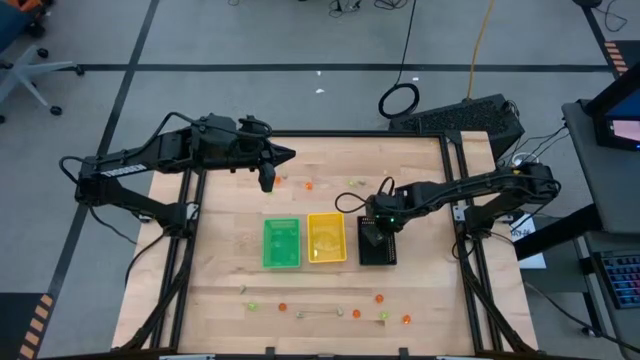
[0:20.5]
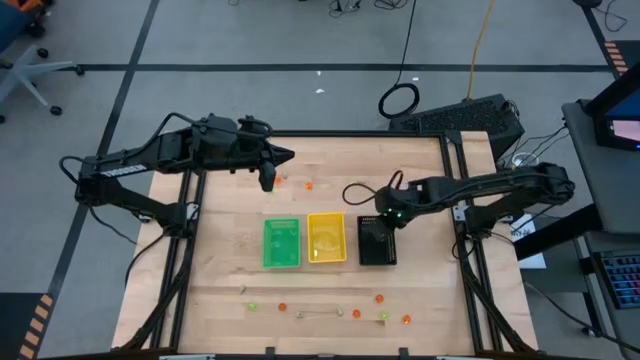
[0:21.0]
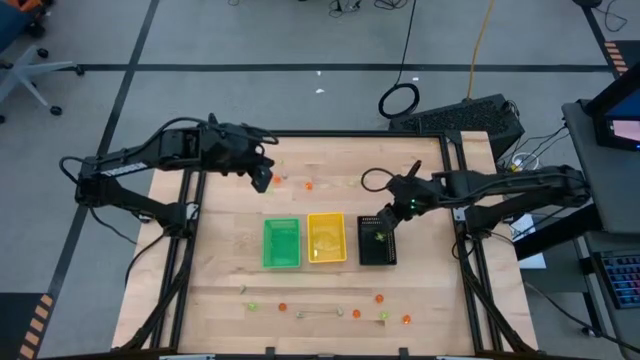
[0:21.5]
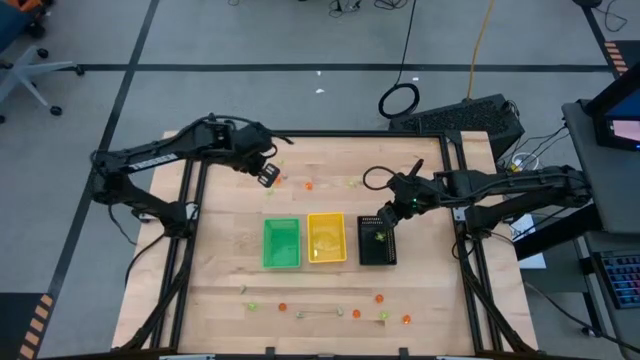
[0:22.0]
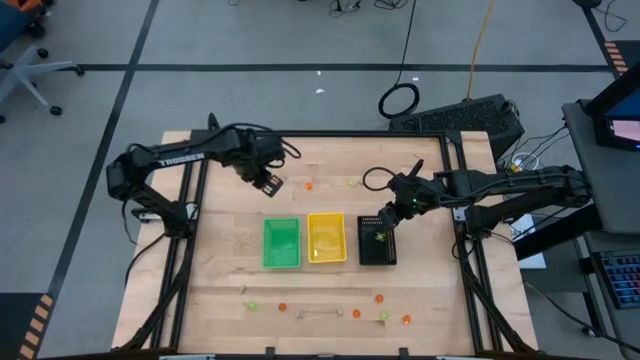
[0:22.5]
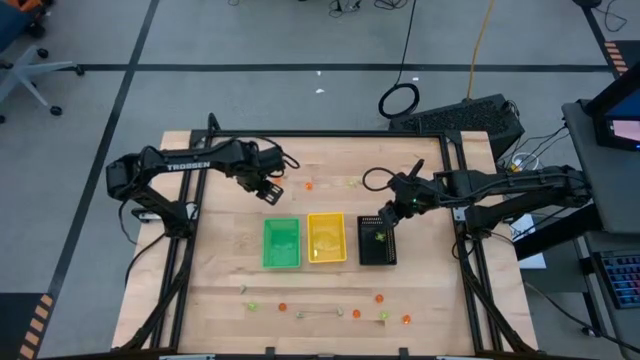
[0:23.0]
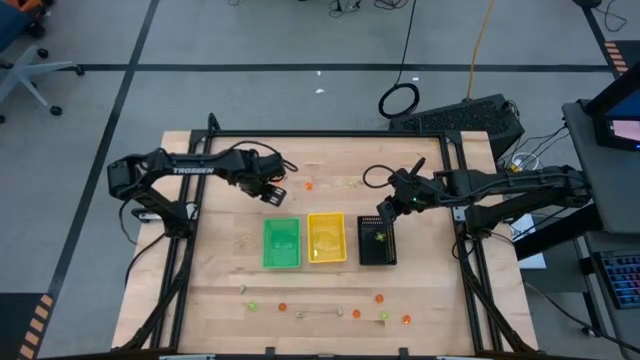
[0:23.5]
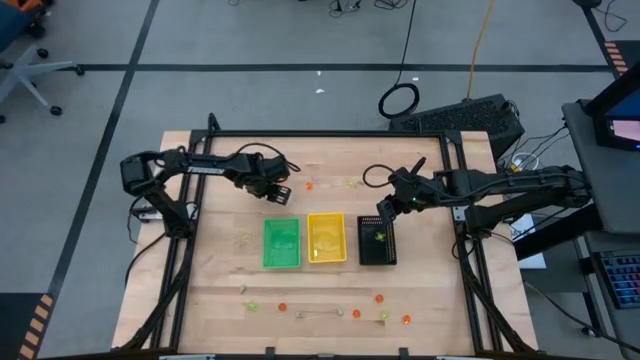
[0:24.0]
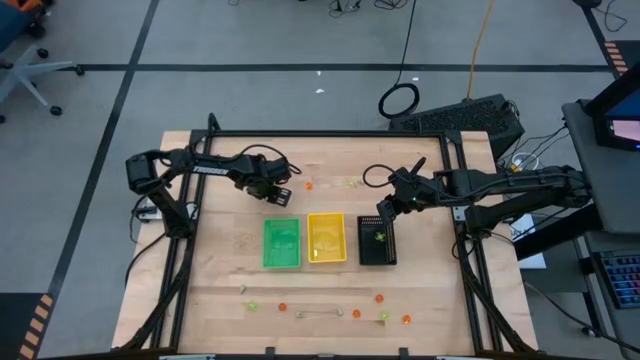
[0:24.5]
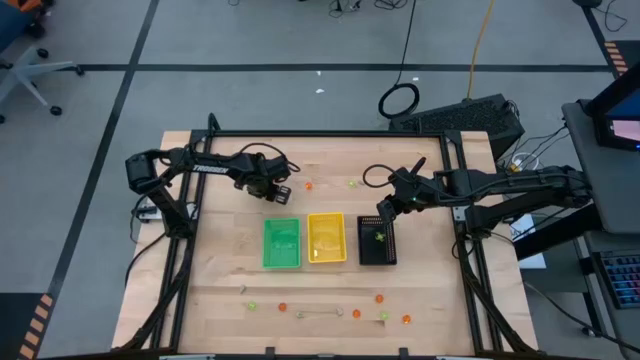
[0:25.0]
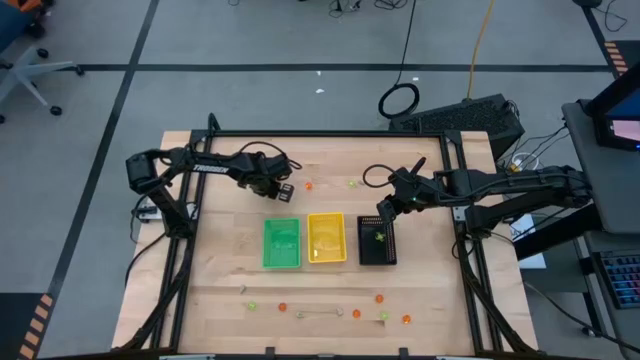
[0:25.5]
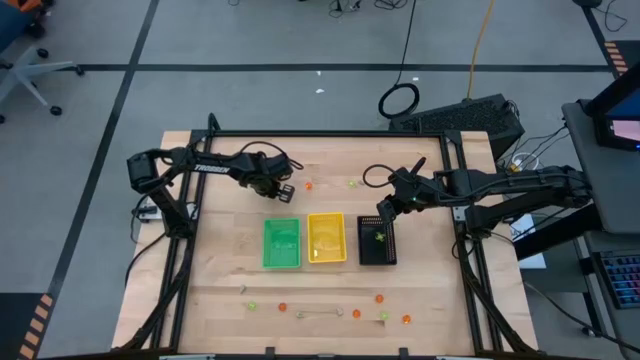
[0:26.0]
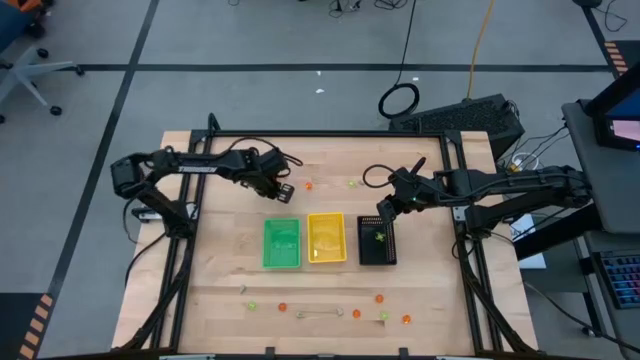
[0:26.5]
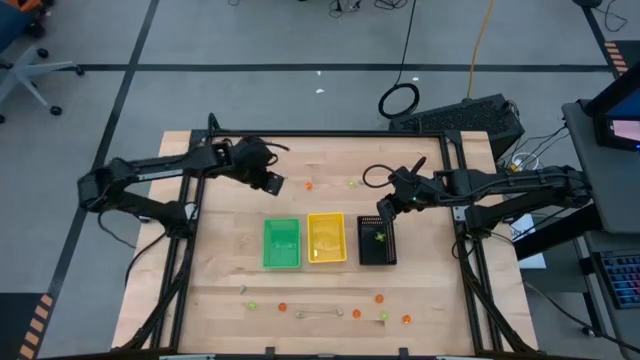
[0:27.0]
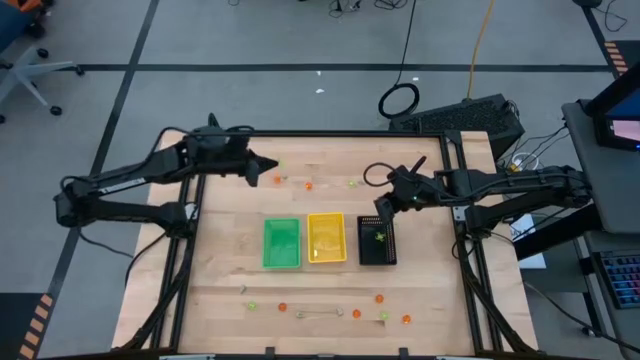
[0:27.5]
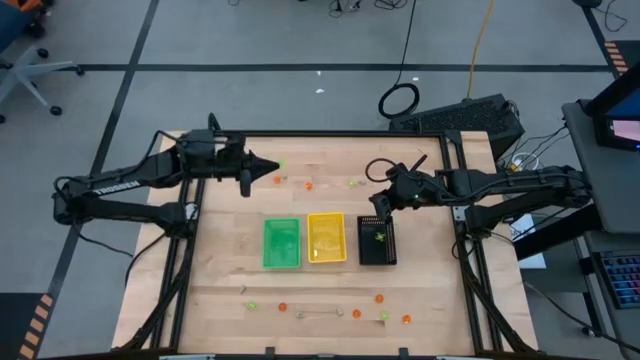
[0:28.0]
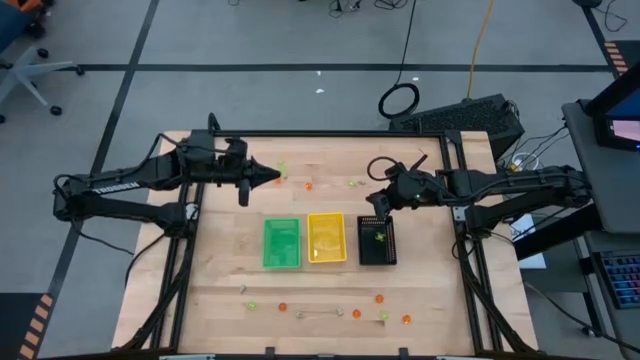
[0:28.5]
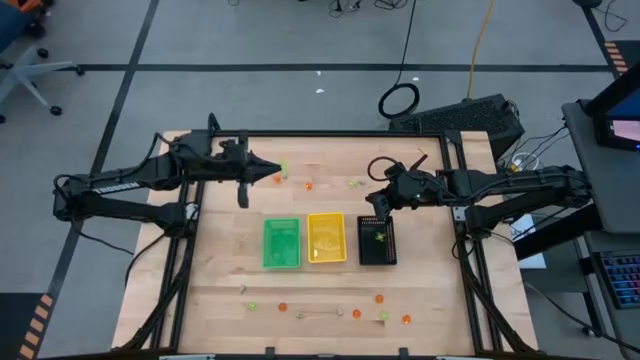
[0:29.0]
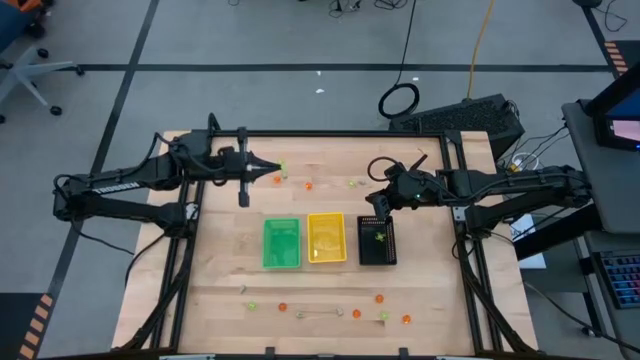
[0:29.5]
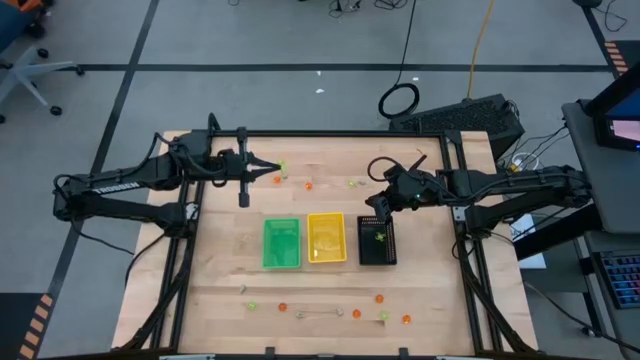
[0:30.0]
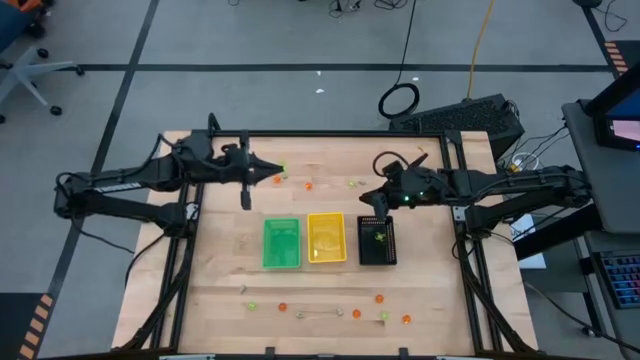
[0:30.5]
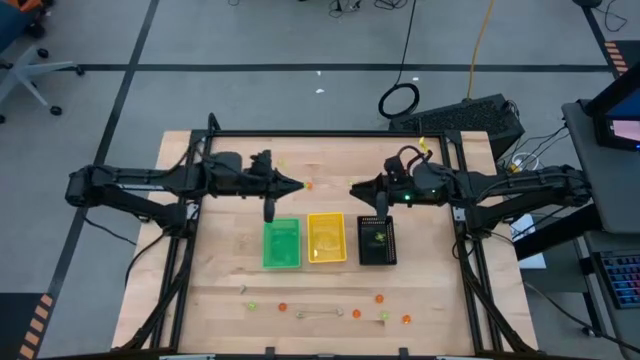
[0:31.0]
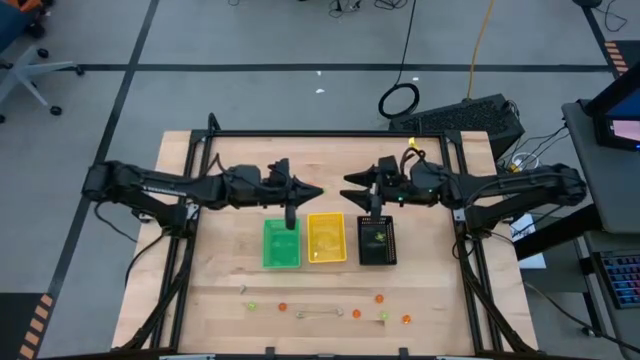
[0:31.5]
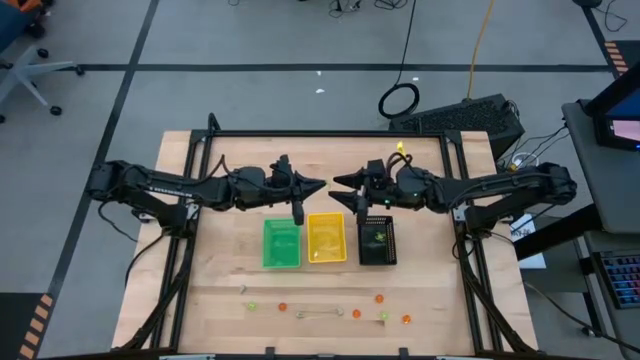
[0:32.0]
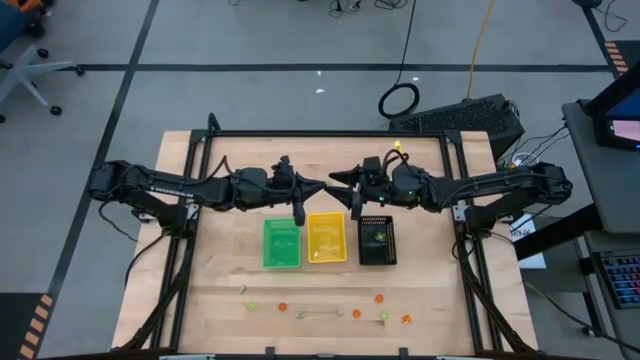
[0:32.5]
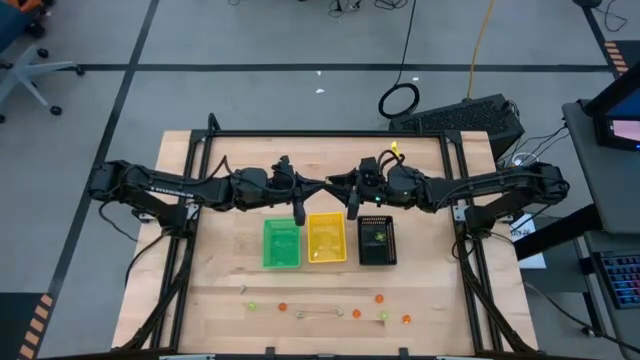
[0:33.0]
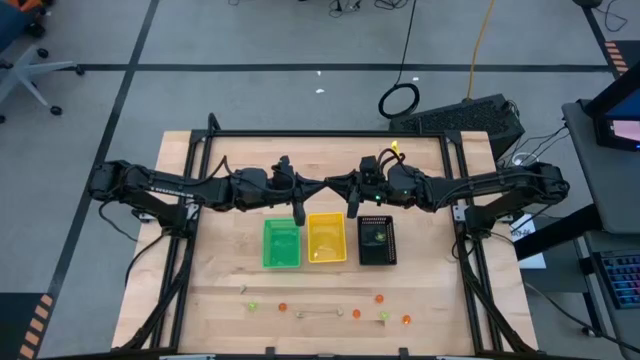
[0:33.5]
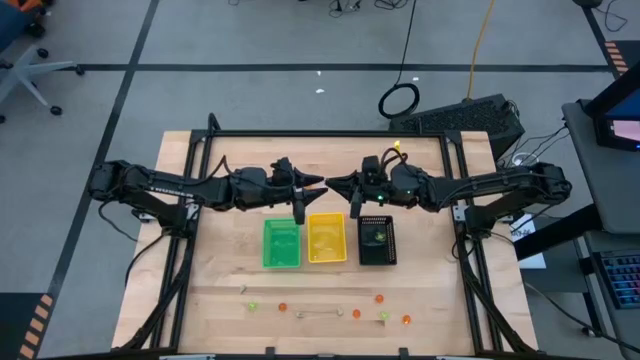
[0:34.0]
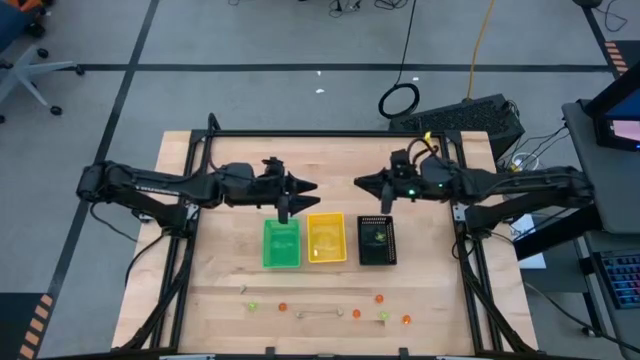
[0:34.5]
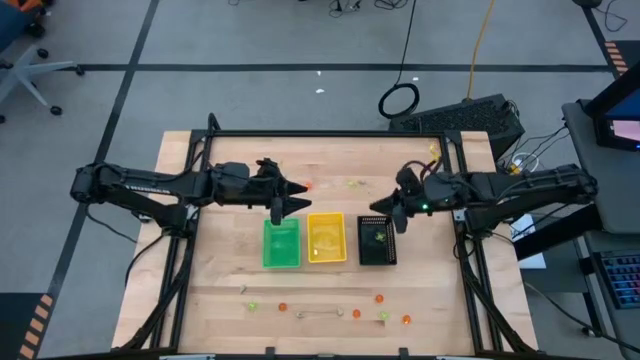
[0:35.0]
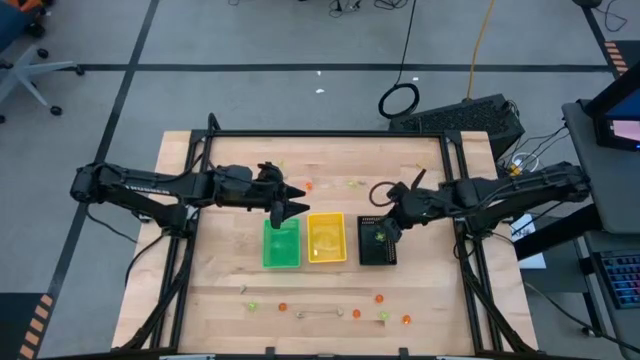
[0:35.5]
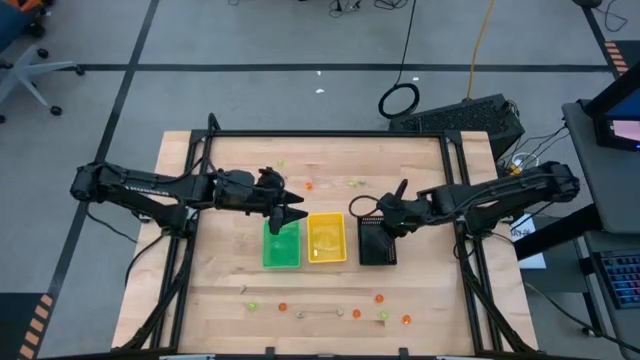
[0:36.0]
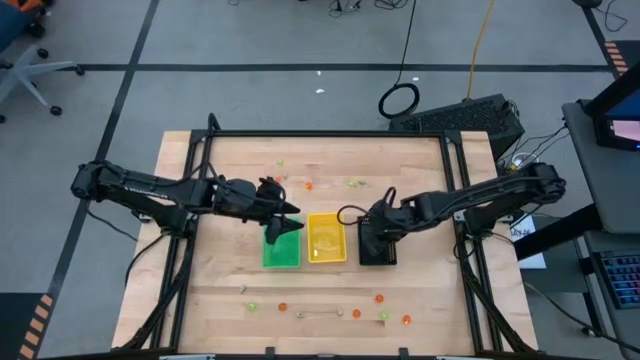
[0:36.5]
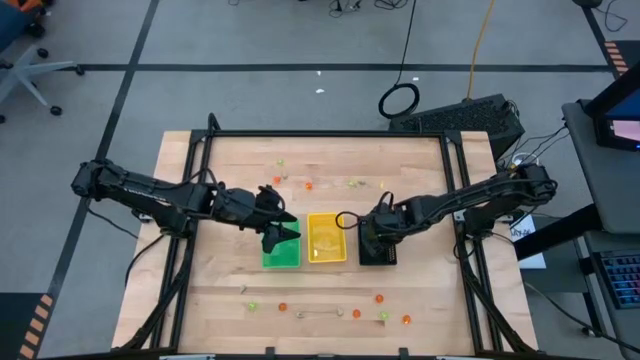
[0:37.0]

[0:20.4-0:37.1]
Task: Sort Halloween decoration
Put the green spider toy into the black basket
